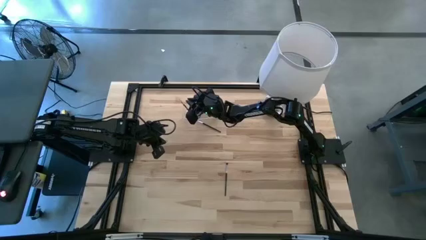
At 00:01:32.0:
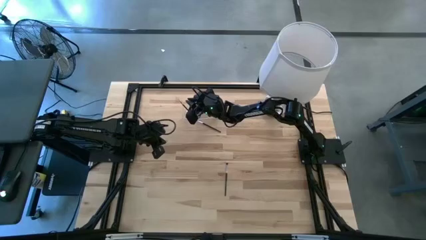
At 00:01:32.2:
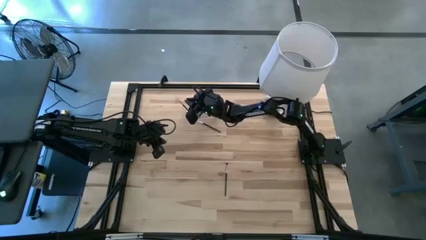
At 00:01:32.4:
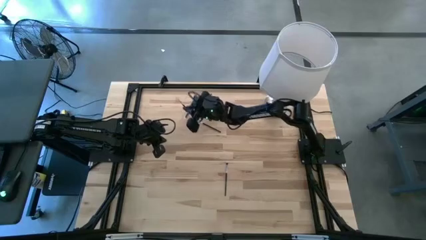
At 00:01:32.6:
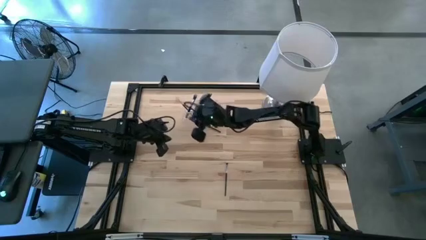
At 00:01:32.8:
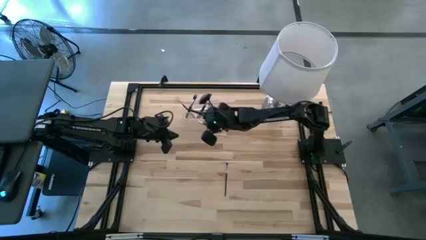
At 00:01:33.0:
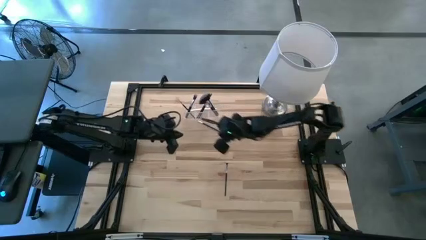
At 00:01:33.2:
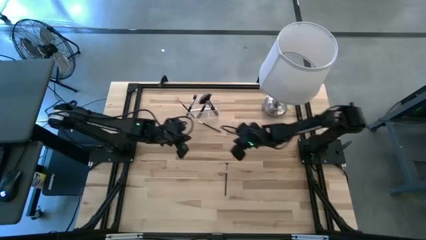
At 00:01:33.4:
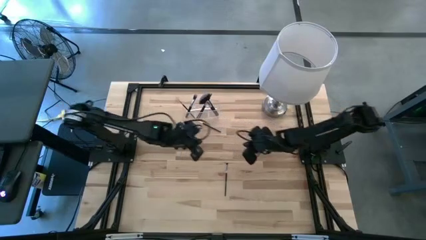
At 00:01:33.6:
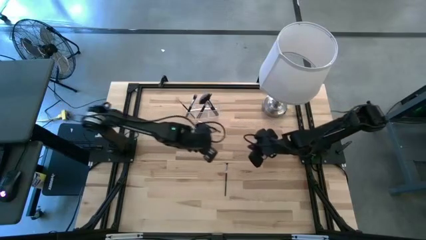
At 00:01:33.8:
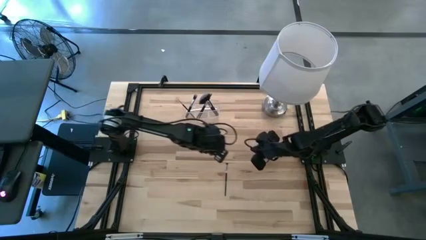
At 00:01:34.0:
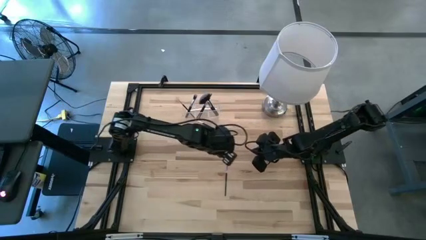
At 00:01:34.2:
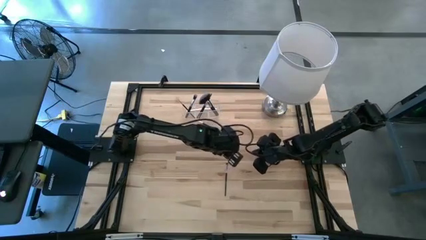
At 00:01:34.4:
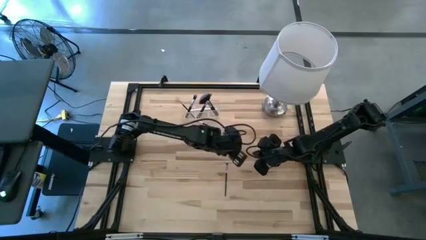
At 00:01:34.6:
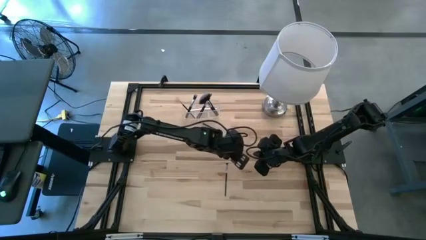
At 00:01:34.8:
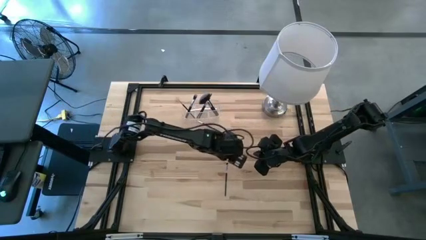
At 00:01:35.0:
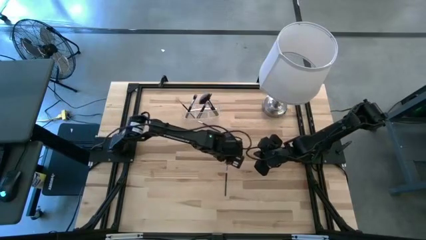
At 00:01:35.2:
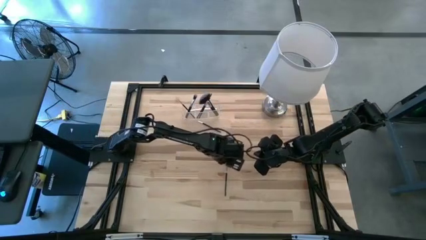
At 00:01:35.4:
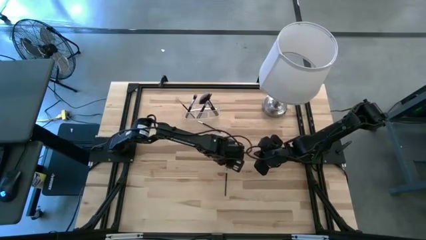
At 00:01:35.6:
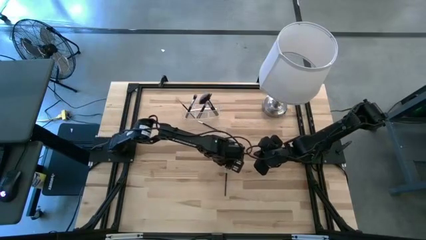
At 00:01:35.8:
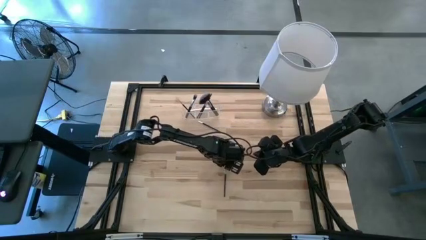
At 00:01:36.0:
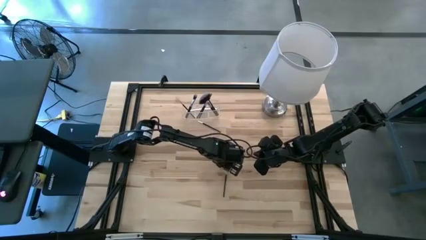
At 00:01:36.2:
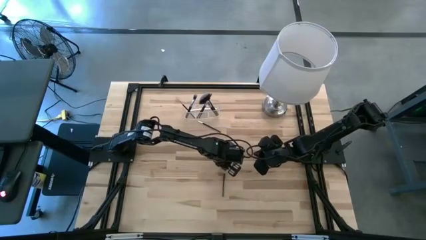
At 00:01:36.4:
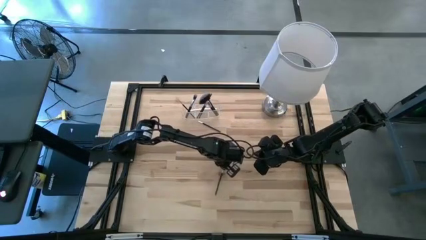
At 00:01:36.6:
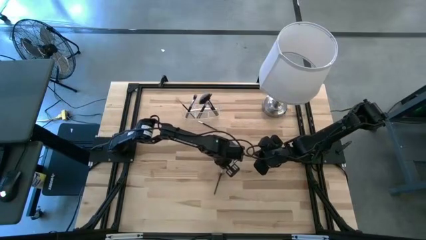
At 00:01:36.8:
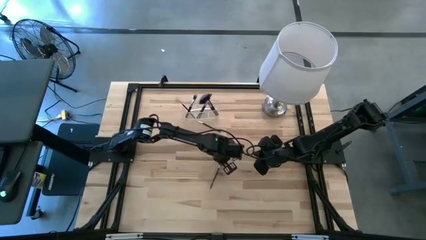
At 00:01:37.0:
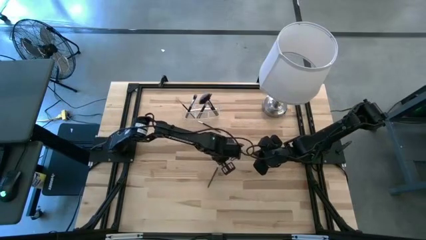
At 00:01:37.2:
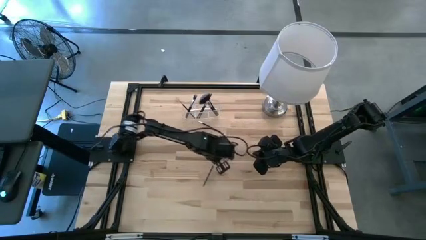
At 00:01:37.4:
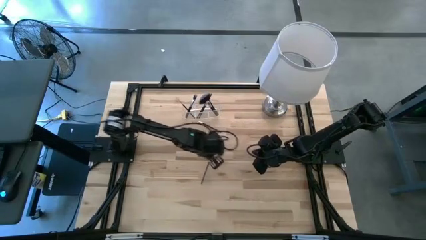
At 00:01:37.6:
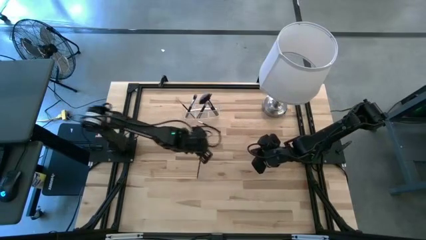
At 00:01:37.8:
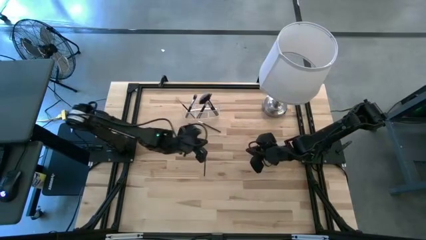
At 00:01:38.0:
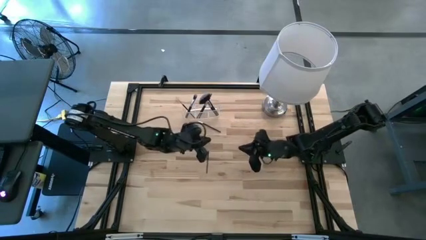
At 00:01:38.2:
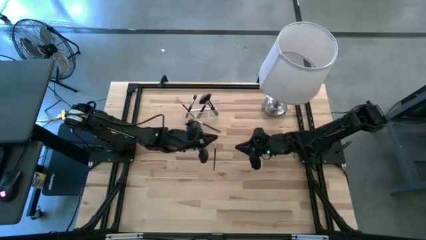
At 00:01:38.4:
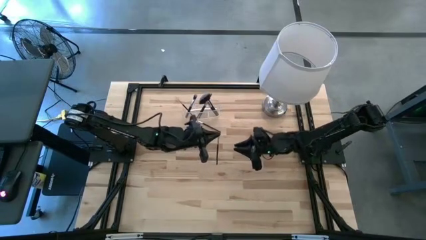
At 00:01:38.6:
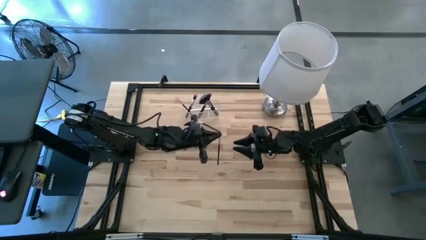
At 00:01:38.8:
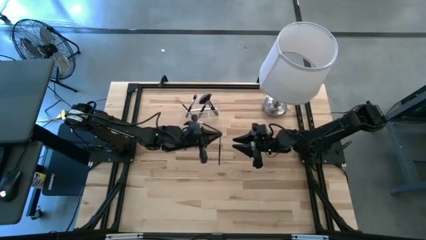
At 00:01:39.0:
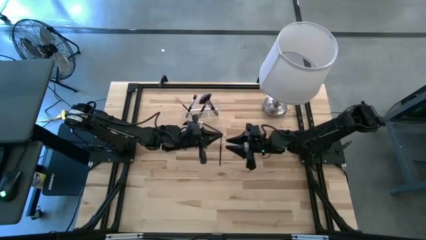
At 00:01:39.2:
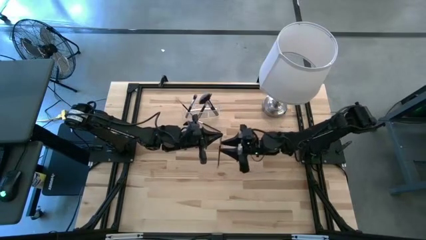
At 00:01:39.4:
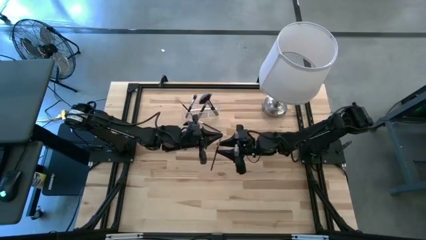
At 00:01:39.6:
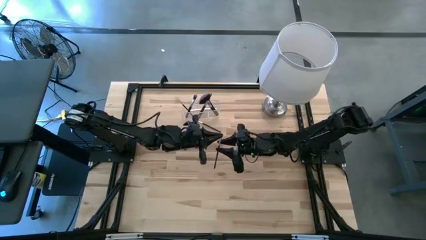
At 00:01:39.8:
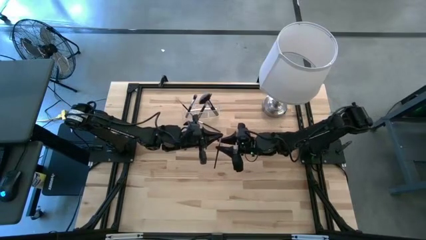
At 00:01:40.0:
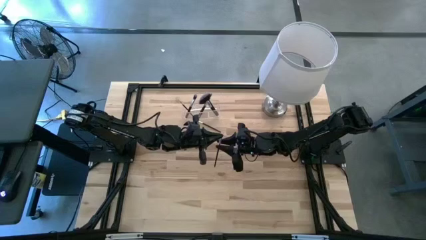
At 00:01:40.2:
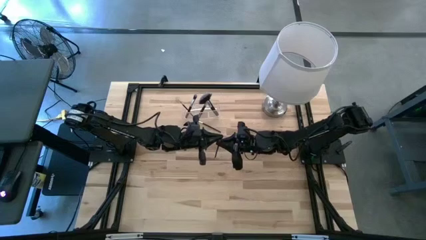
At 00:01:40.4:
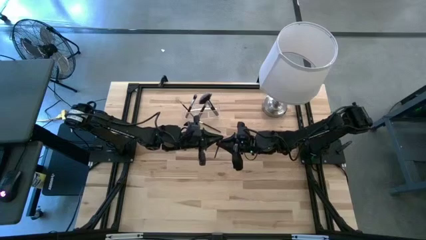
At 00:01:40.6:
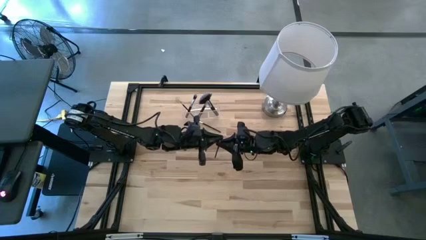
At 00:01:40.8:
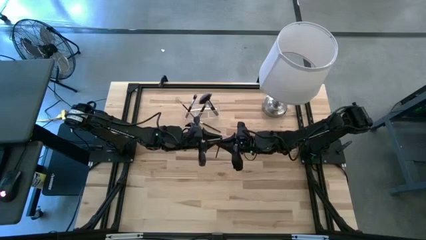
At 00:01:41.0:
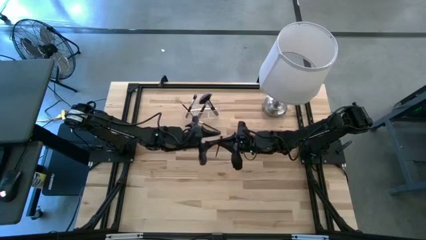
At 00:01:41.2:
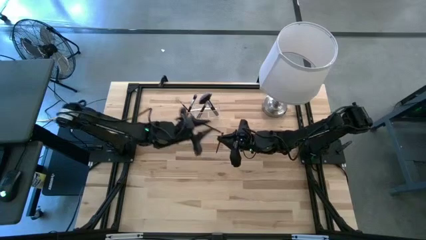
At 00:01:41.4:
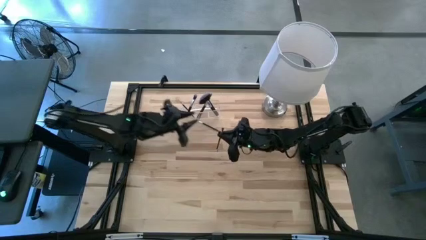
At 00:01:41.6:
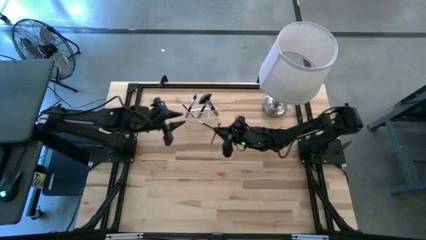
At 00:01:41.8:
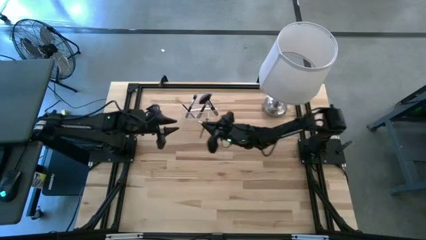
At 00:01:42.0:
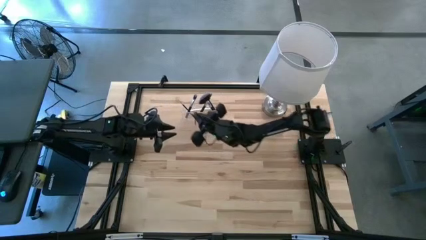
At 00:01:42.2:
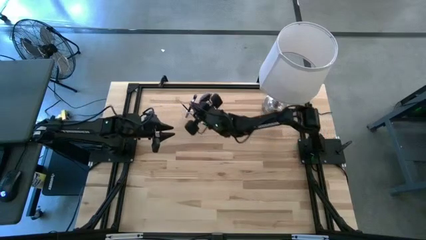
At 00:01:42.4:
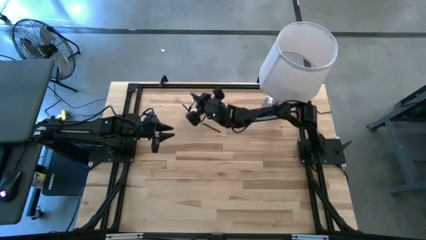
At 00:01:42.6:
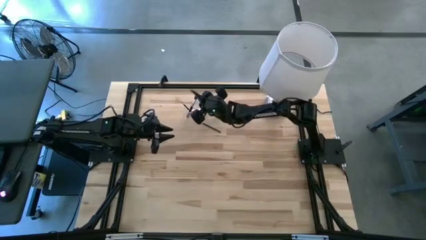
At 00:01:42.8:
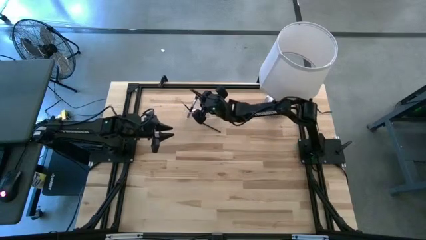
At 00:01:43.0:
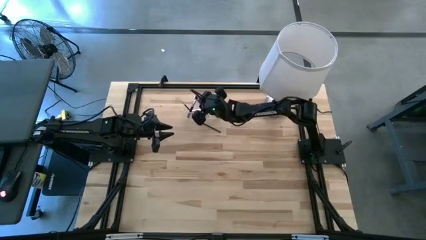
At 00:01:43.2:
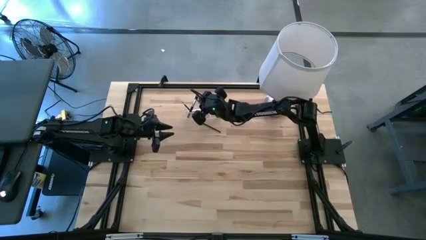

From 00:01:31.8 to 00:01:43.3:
Task: Put items in baskets/containers
Put the highlighter brush into the transparent organizer

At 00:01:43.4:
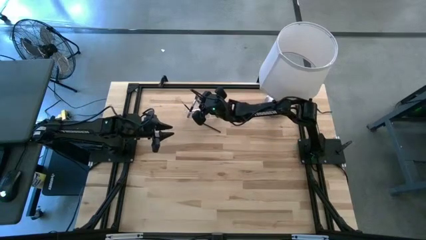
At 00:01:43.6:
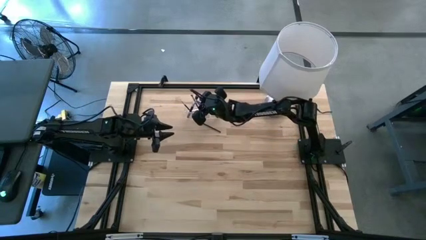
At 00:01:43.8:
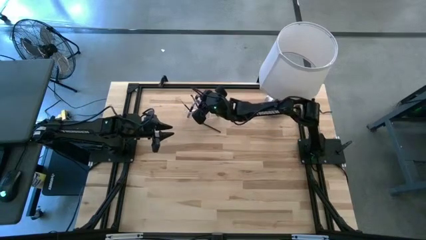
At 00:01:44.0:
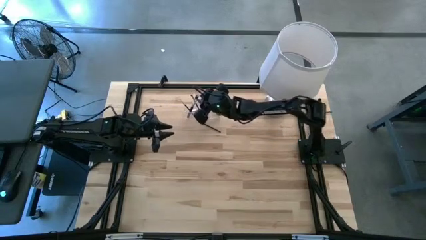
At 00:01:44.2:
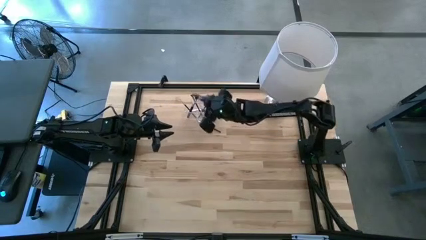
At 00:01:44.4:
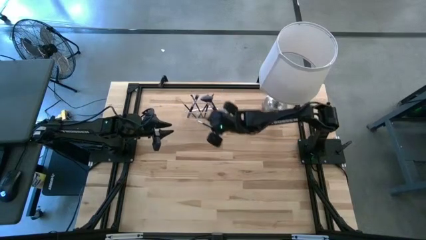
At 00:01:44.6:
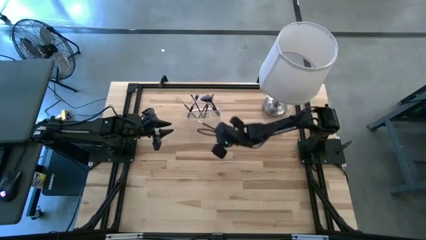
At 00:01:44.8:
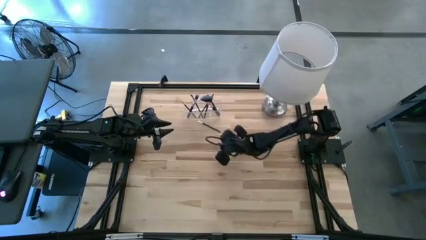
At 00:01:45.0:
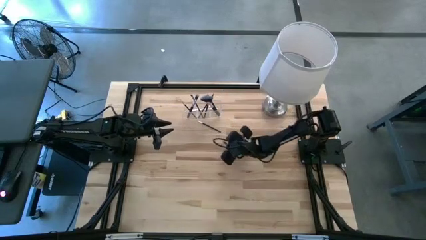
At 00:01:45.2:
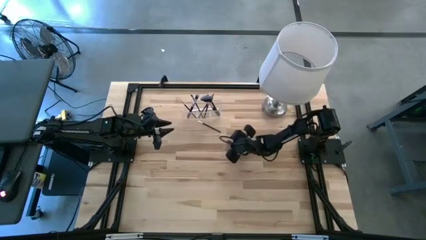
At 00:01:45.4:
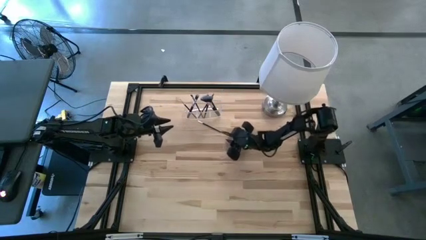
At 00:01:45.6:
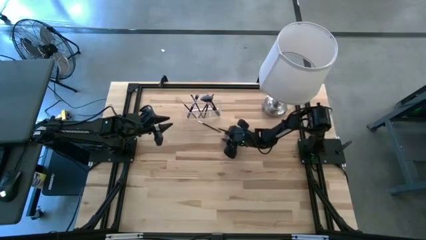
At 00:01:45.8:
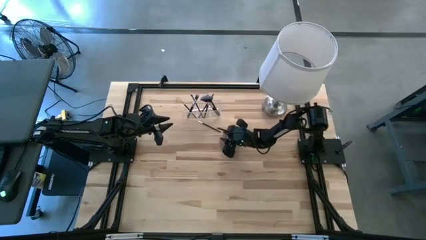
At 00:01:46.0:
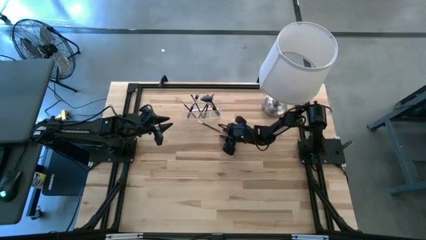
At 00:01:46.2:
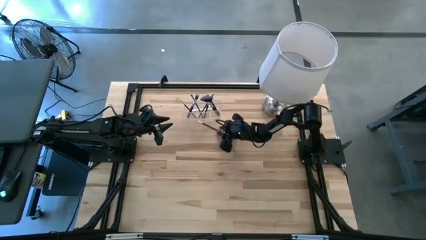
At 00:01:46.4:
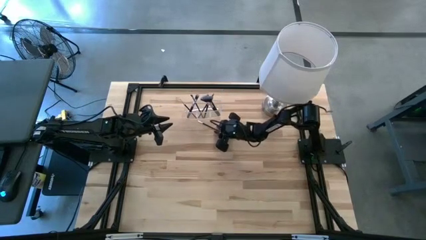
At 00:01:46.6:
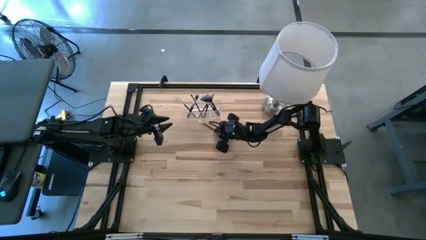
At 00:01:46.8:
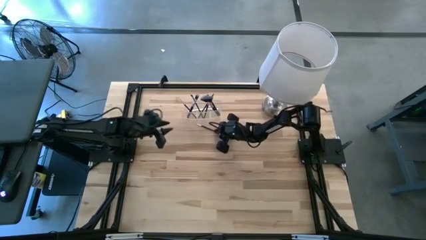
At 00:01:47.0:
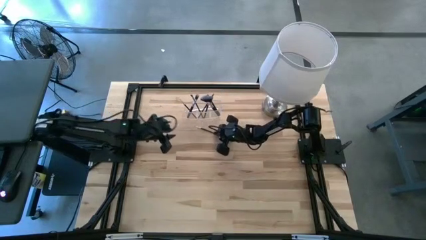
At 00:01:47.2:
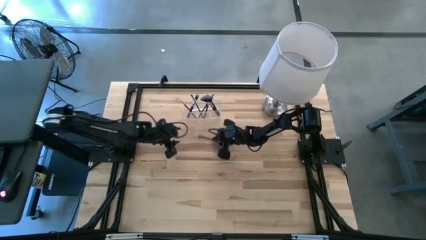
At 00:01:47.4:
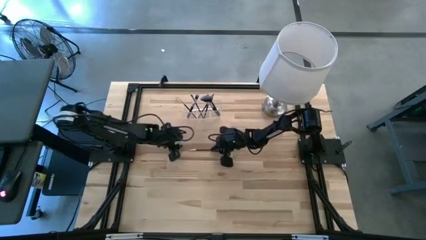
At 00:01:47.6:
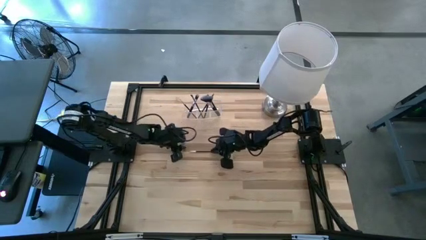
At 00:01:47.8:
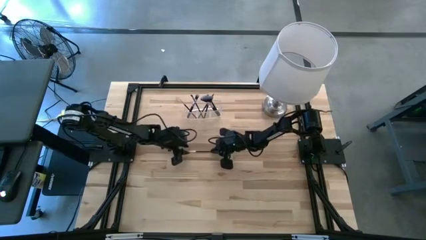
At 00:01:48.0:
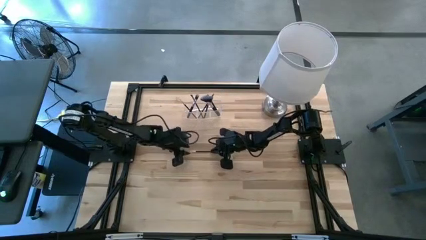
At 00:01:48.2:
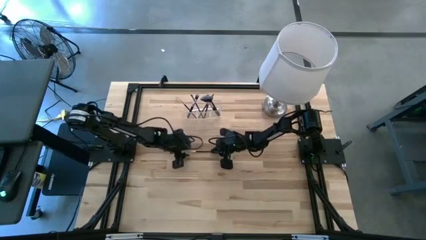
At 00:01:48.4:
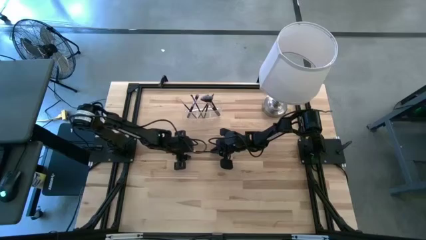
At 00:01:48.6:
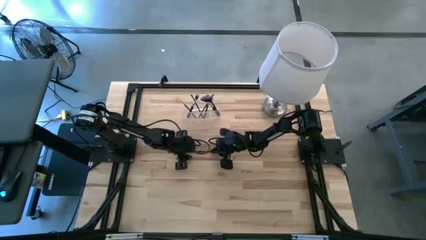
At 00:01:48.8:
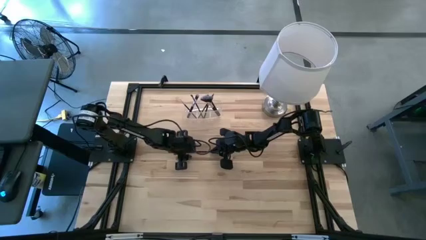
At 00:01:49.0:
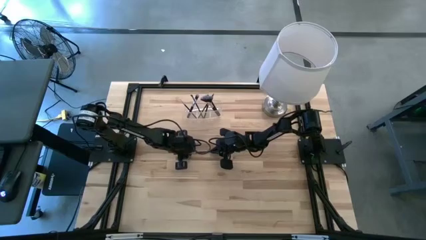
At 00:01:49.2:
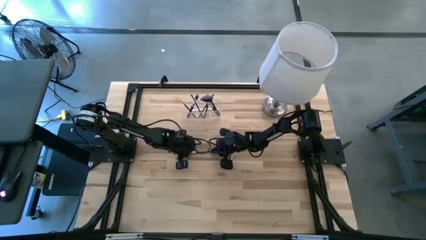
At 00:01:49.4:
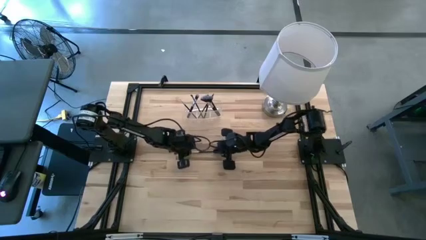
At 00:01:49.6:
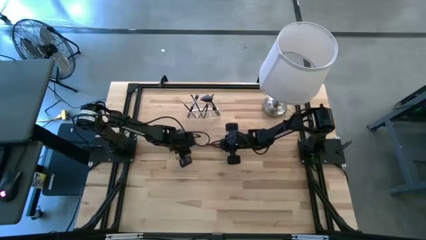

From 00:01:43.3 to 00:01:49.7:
Put the liner brush into the transparent organizer
